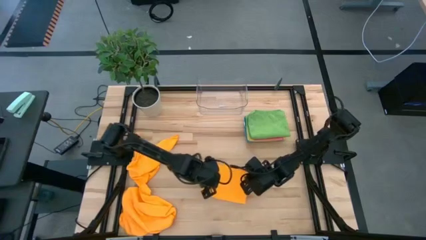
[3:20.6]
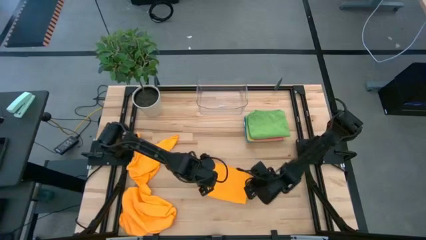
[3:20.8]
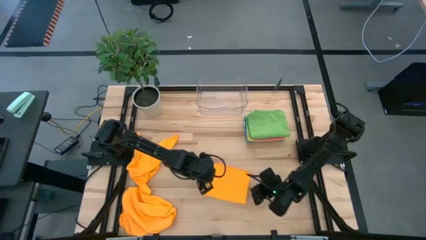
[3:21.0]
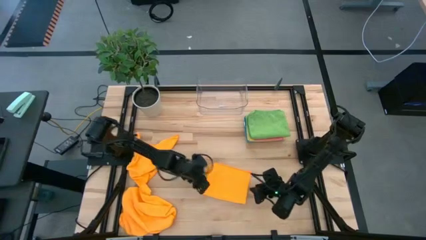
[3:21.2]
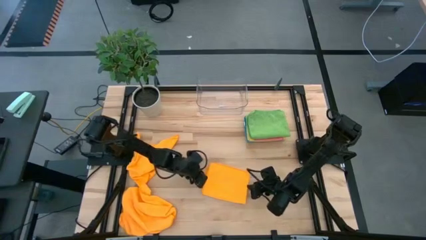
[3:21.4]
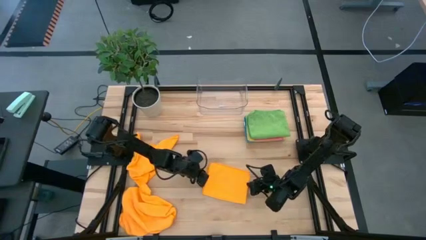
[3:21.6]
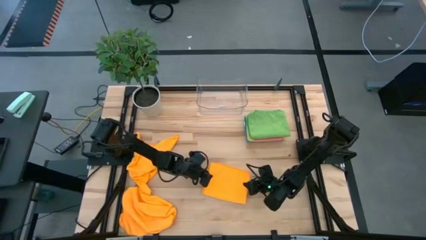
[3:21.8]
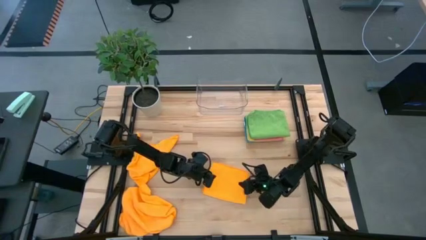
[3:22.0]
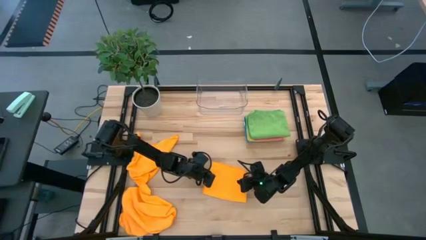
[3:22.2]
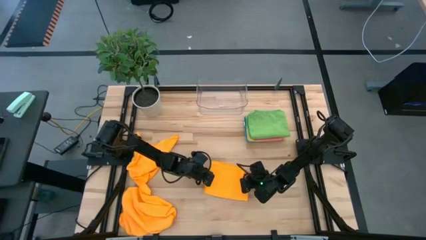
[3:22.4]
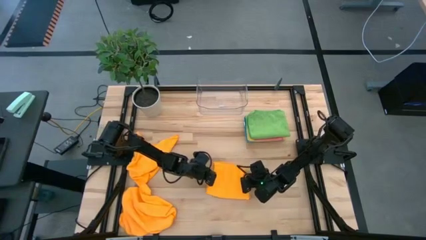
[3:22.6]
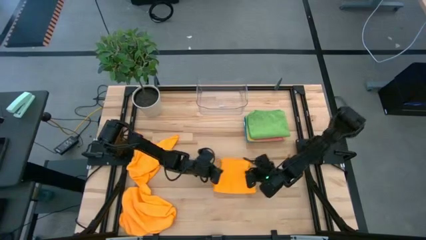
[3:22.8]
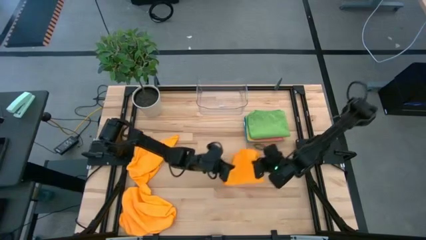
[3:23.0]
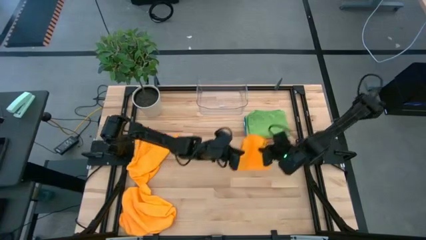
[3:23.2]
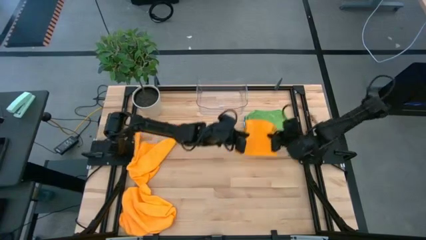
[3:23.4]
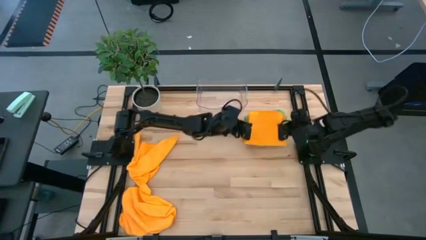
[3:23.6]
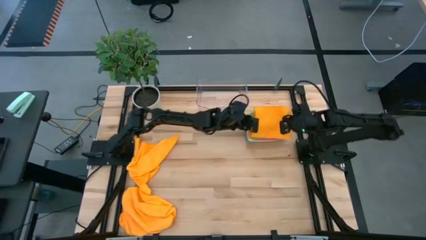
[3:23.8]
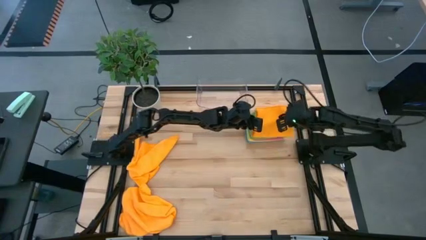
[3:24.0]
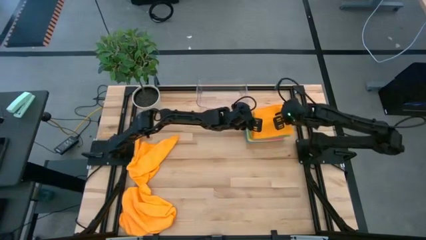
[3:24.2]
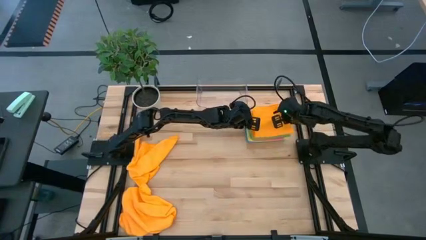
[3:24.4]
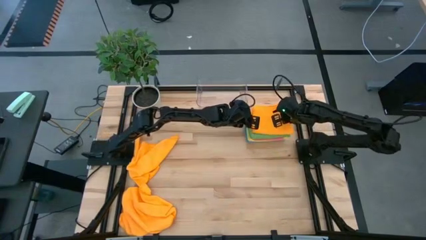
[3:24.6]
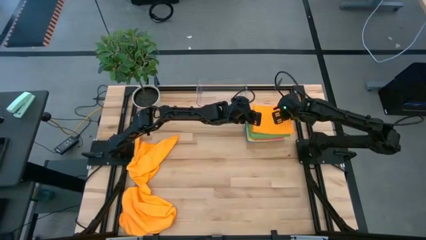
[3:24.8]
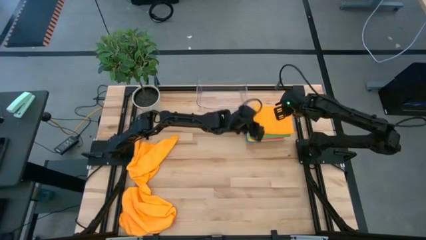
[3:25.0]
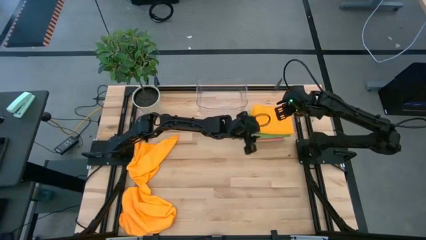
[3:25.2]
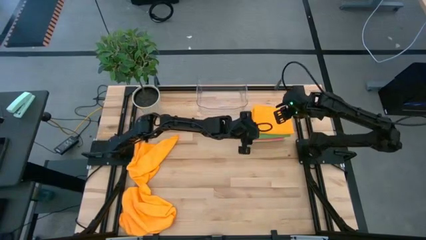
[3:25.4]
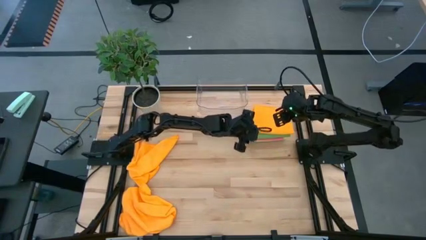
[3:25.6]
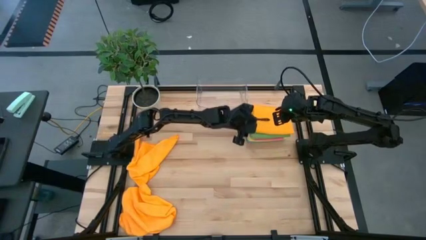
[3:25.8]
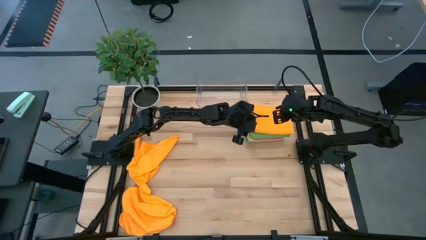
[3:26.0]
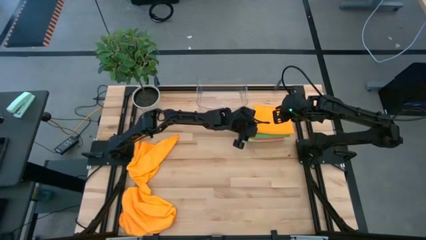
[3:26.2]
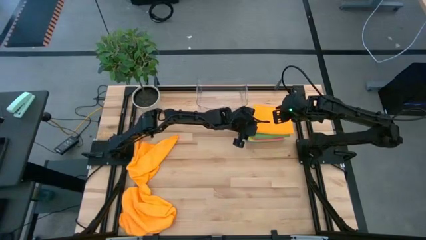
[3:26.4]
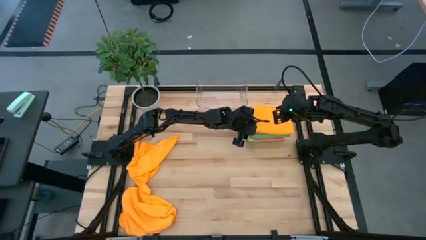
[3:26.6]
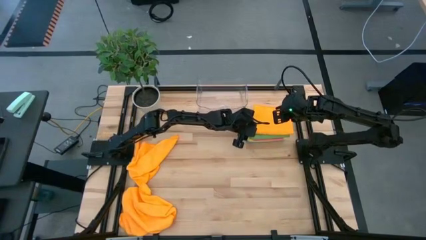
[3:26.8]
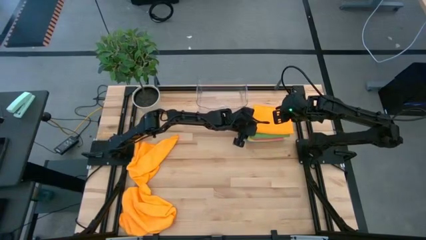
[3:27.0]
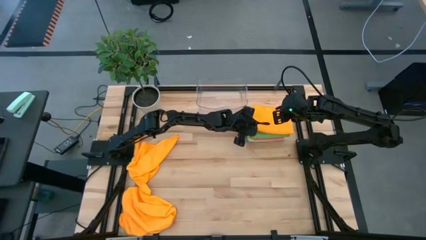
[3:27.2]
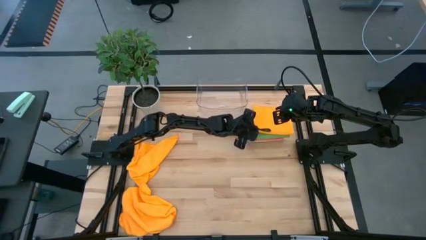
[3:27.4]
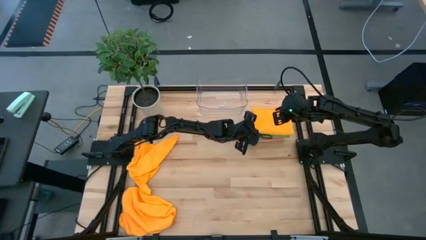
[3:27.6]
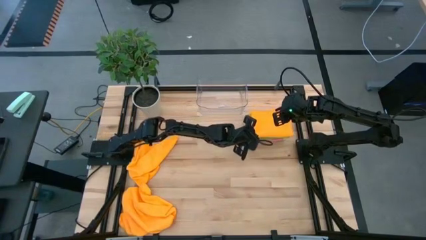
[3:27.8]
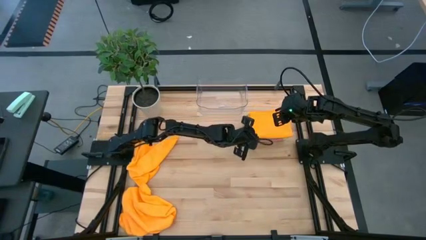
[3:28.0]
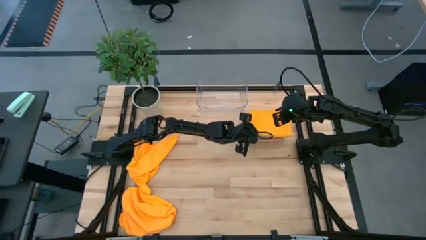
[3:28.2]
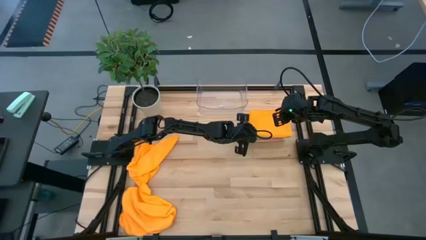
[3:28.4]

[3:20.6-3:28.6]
Task: Fold microfiber towels
Stack the top right orange towel on the top of the green towel

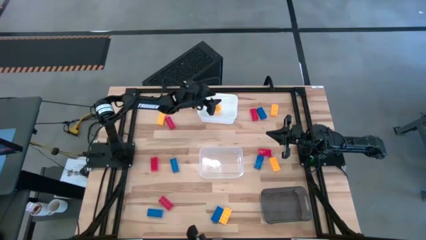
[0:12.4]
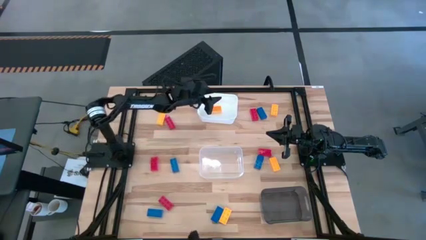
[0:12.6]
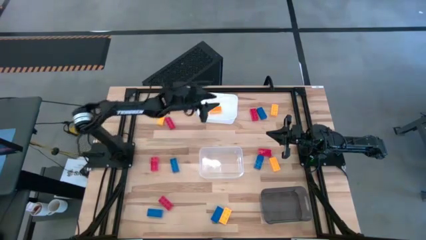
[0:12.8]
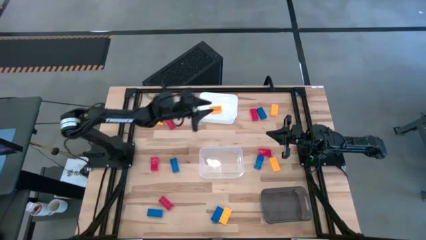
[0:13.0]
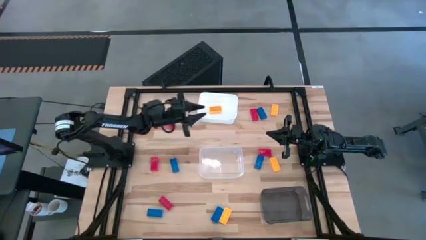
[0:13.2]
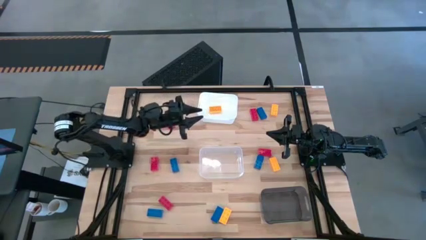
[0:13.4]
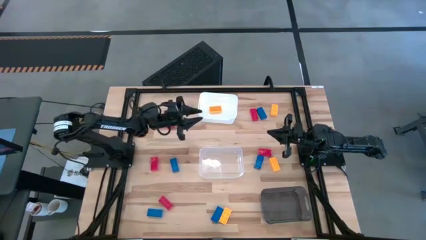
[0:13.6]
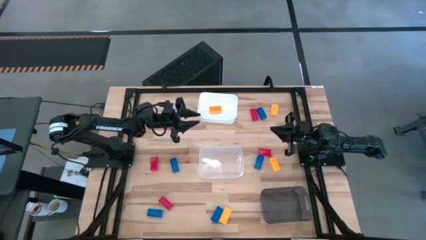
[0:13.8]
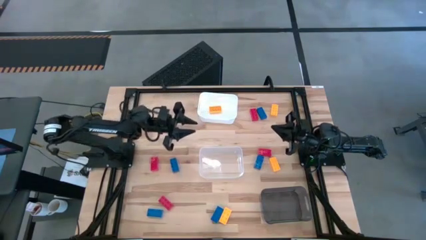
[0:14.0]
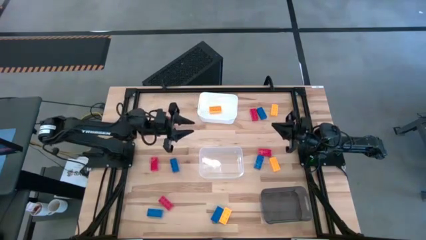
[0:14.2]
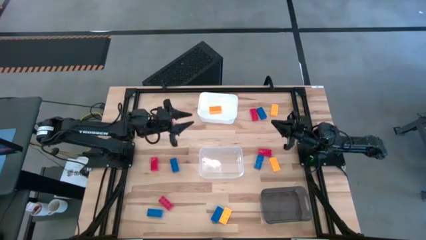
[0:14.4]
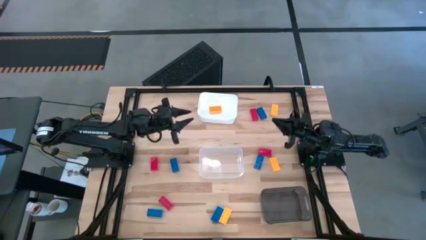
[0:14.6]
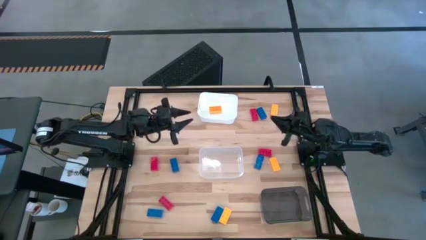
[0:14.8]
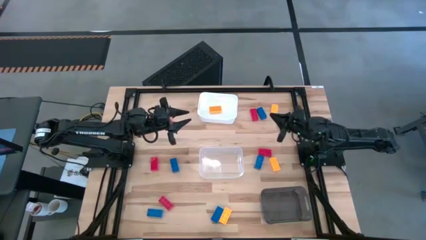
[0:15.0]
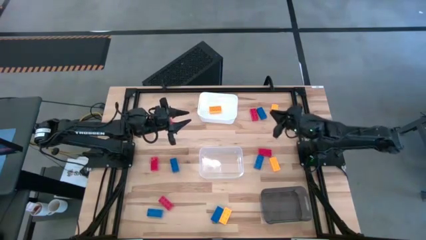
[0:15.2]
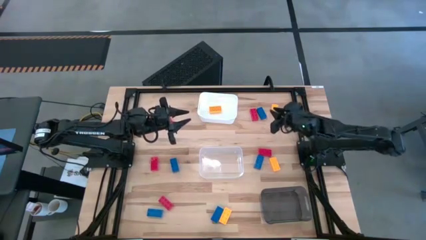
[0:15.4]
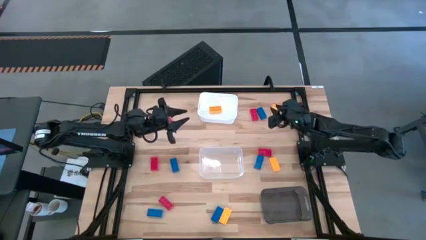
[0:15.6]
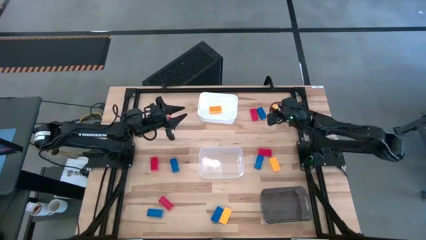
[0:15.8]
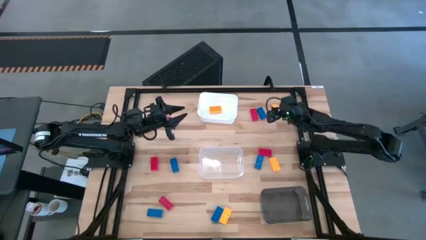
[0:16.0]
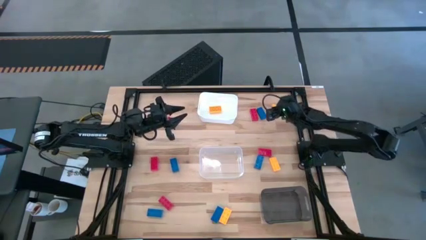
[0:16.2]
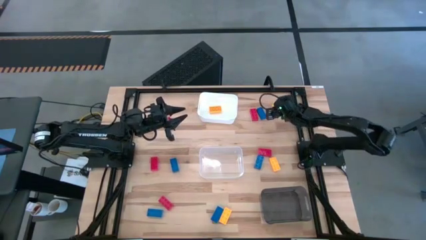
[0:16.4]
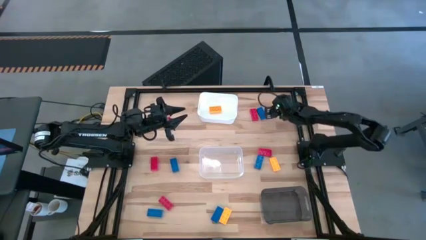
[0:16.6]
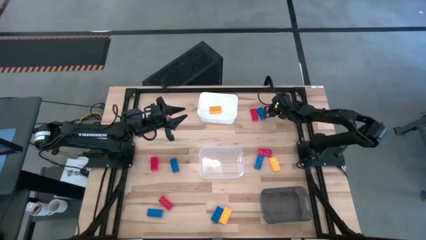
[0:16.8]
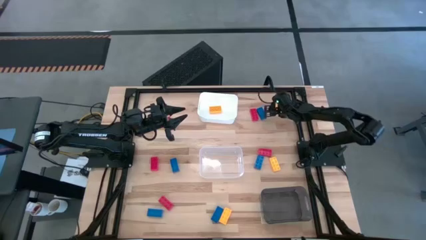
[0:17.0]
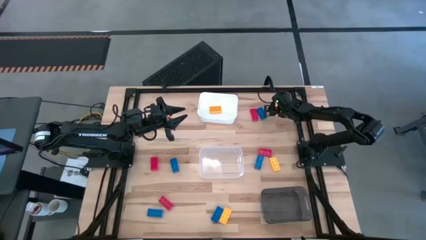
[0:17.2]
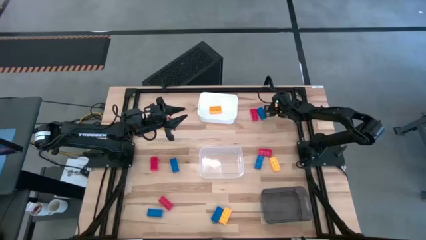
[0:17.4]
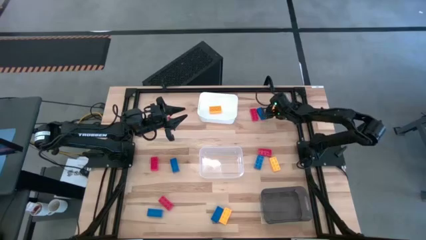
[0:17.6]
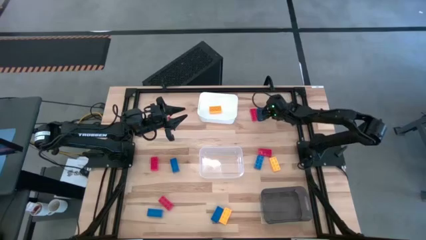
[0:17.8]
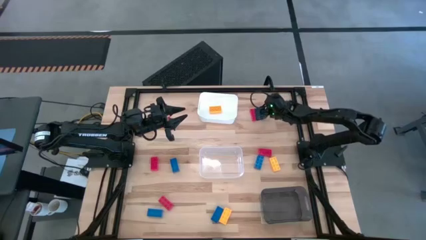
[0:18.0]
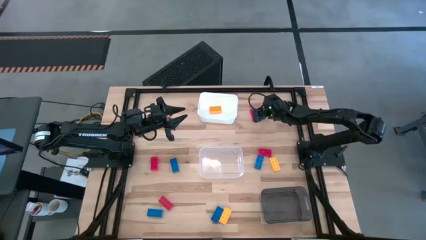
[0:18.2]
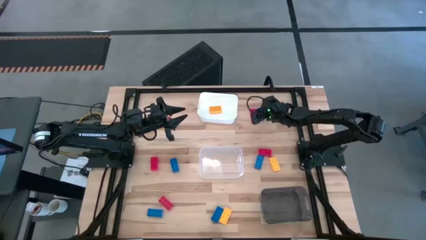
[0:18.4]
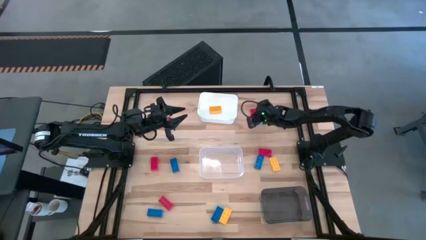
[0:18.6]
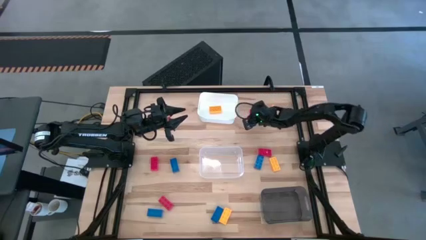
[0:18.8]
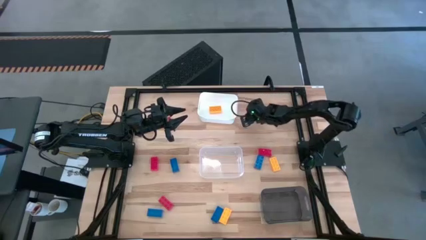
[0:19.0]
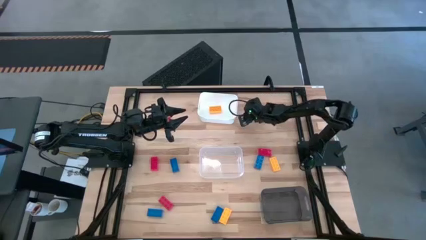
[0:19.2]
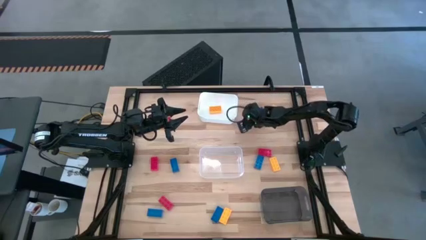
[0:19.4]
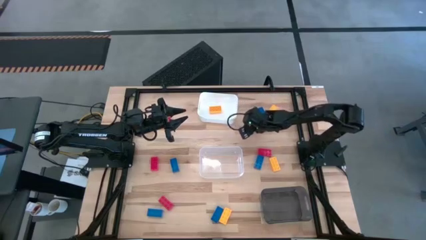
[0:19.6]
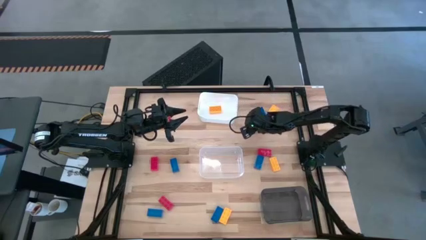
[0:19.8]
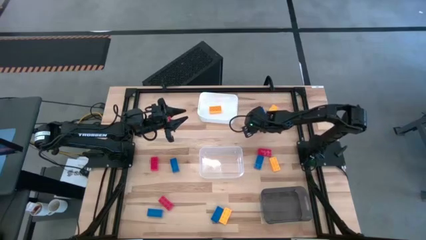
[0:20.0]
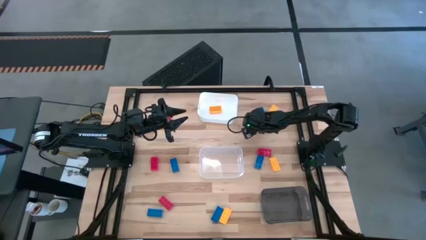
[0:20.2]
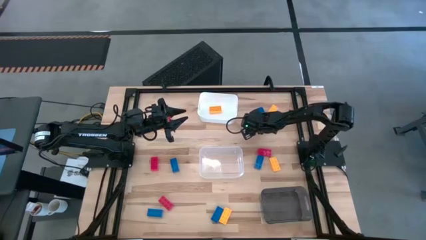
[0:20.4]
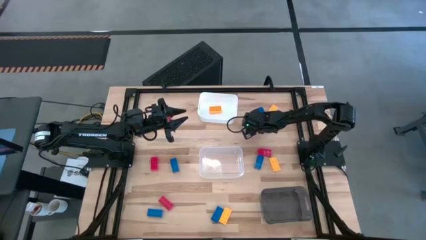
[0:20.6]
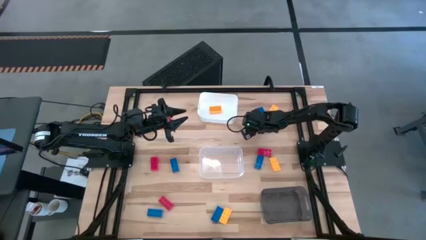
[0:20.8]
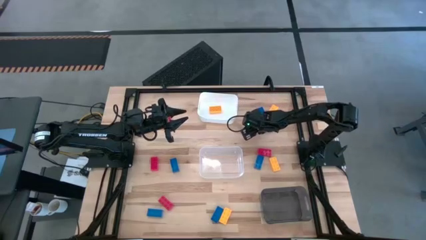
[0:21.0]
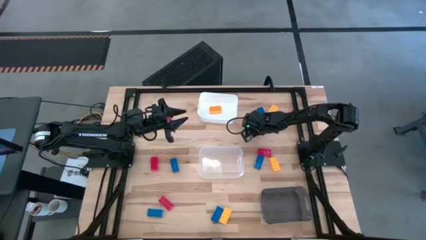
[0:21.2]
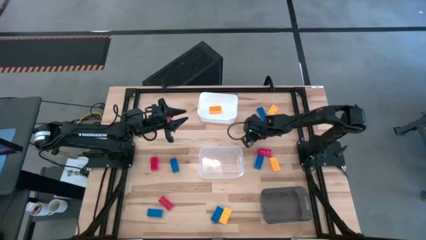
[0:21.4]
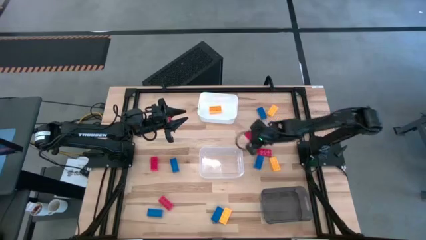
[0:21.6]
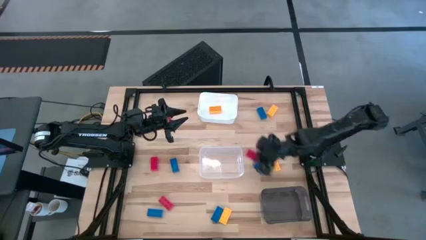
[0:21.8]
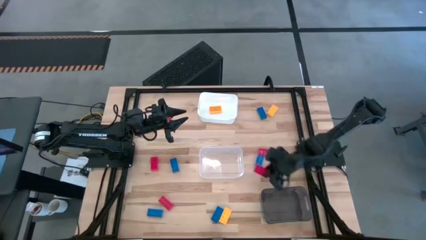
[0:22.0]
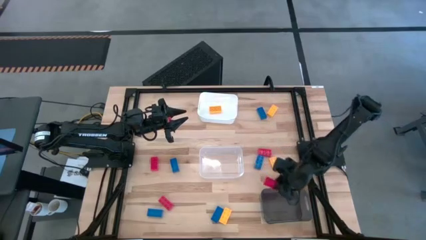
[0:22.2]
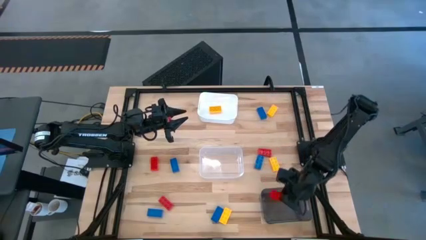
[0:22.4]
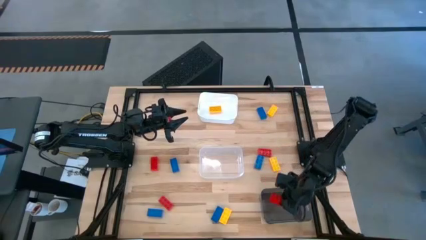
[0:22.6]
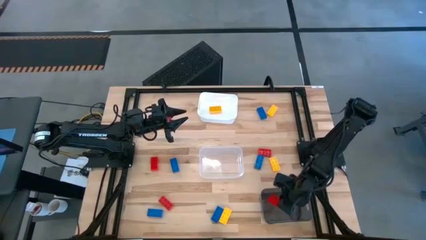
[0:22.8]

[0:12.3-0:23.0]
Task: Sort & place blocks by color
Put the red game piece into the black bin
